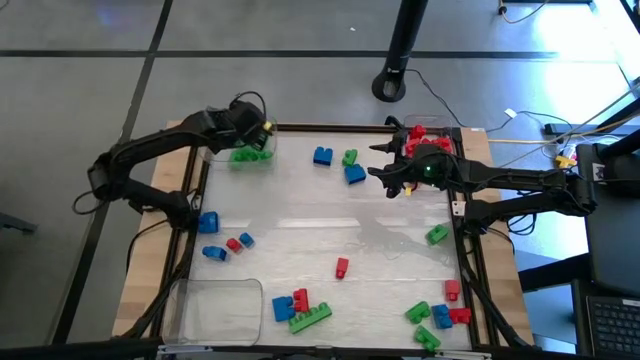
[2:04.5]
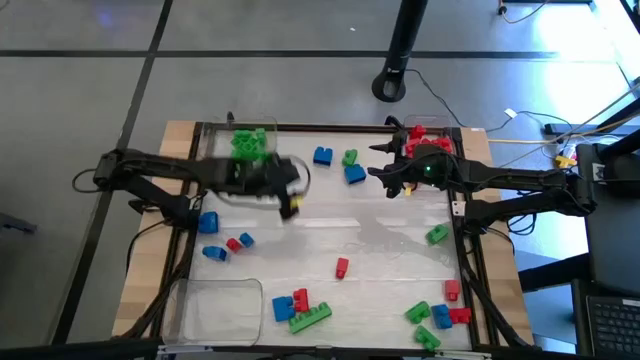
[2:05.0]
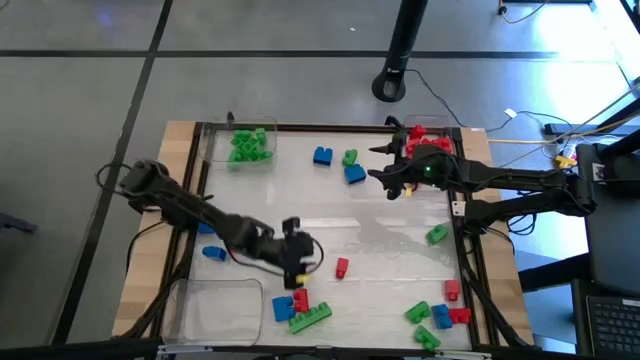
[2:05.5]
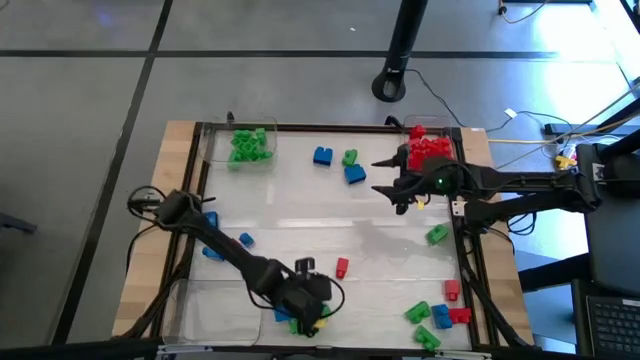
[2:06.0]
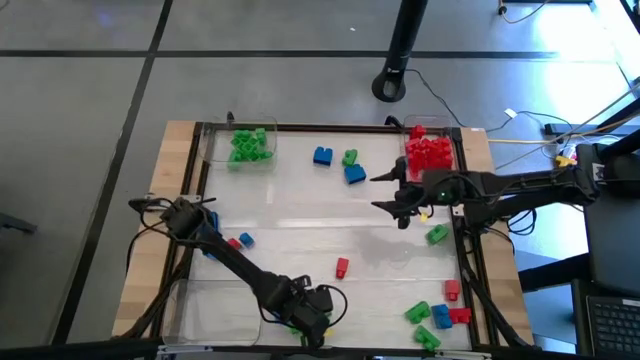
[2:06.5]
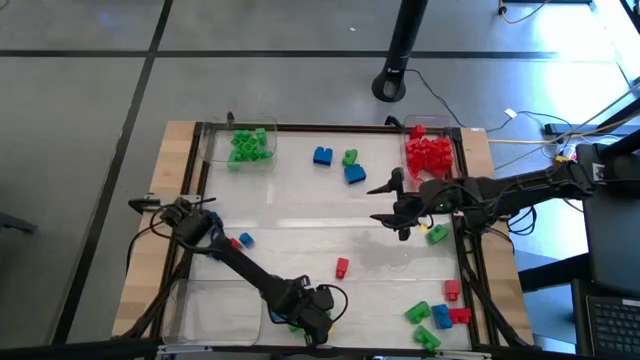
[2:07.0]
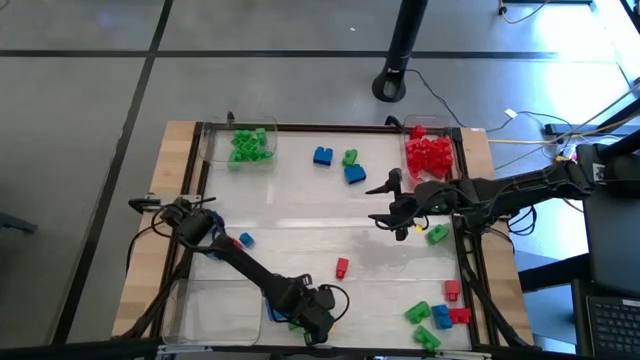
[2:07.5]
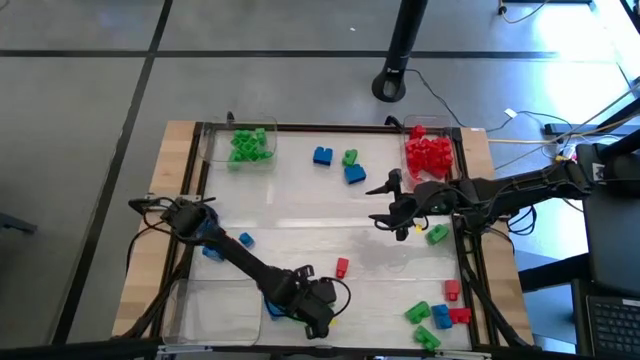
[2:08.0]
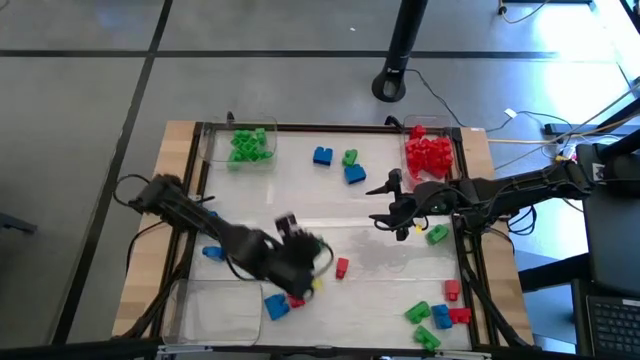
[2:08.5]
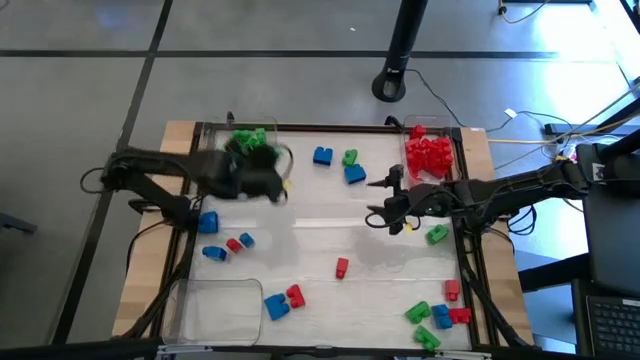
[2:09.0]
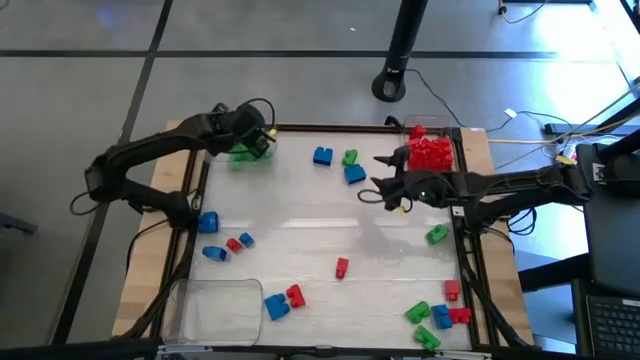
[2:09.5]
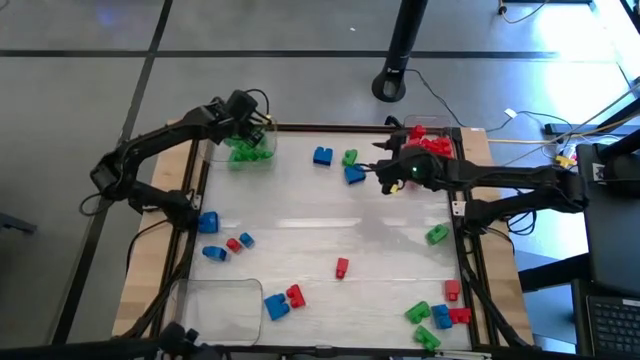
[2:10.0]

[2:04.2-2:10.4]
Task: Sort blocks
Put the green game piece into the left transparent bin

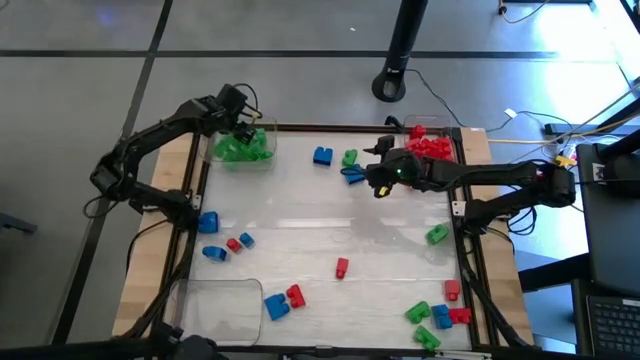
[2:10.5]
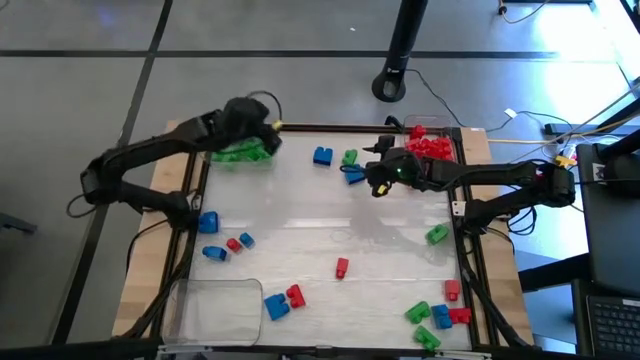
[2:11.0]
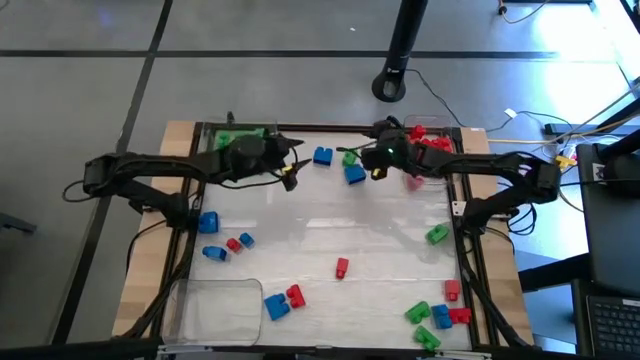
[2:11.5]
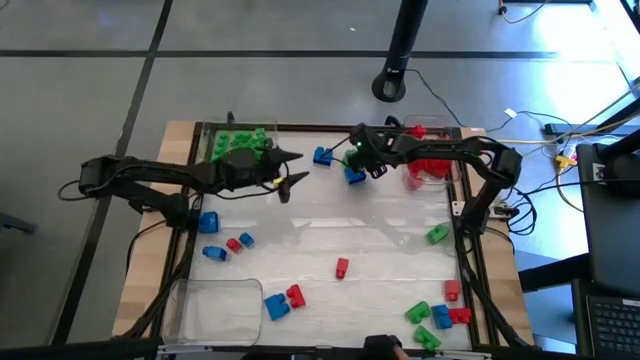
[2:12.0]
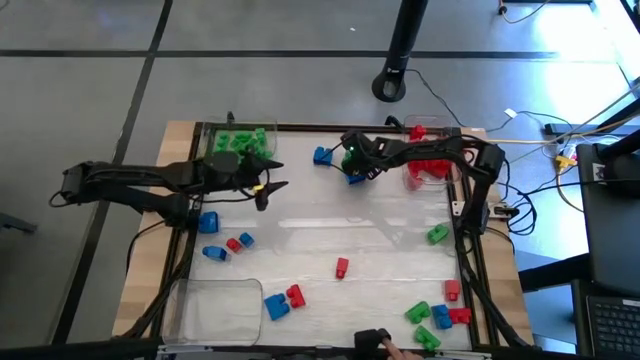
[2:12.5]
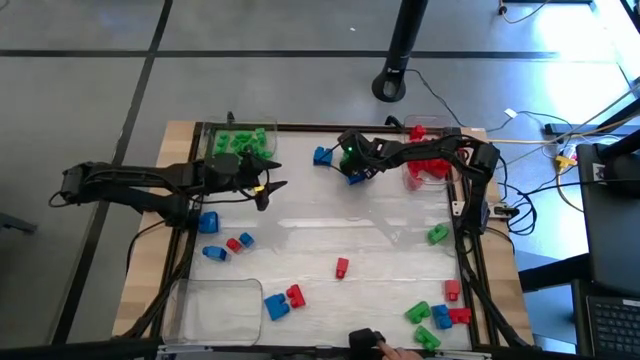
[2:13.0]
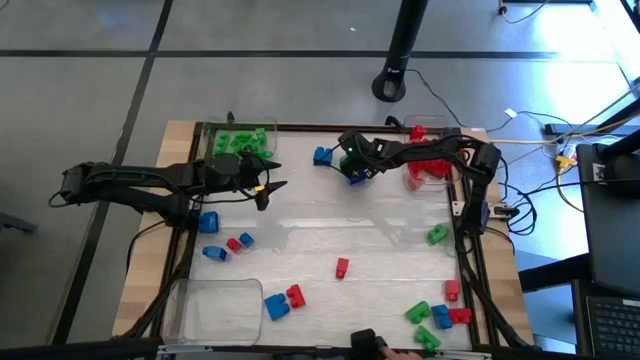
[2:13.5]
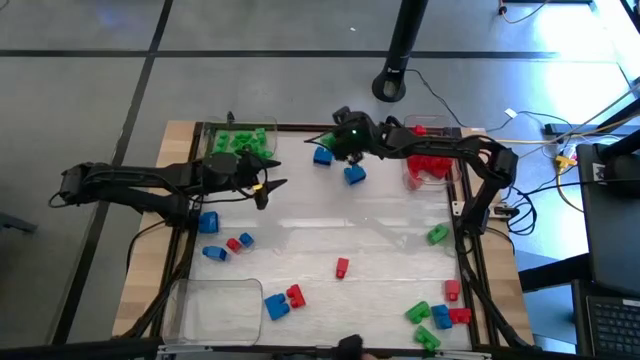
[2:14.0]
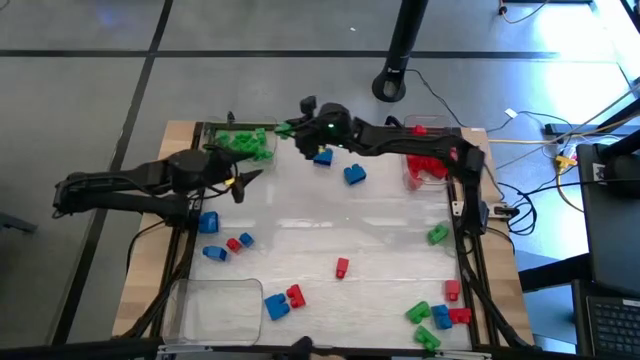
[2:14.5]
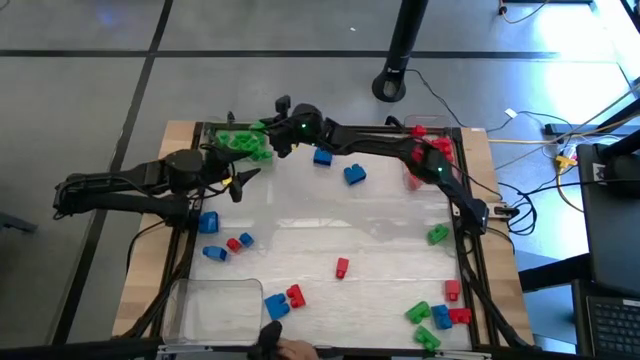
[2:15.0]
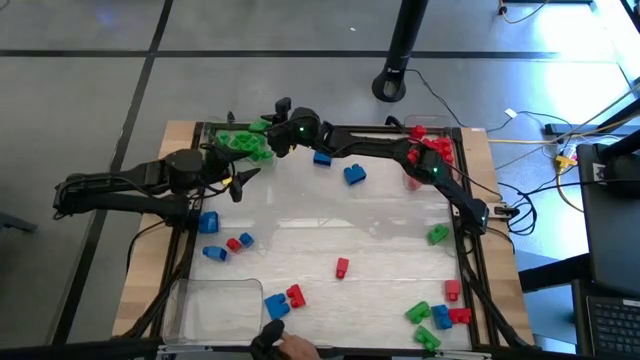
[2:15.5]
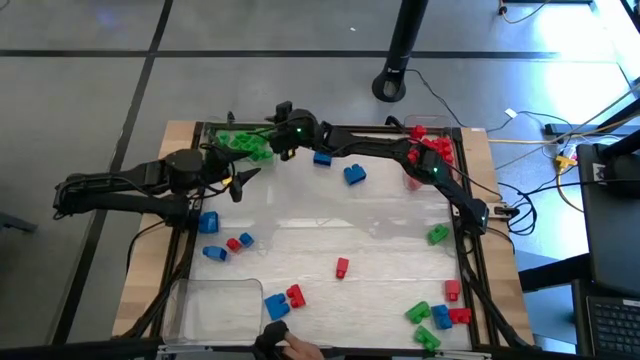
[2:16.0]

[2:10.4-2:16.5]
Put the green game piece into the left transparent bin

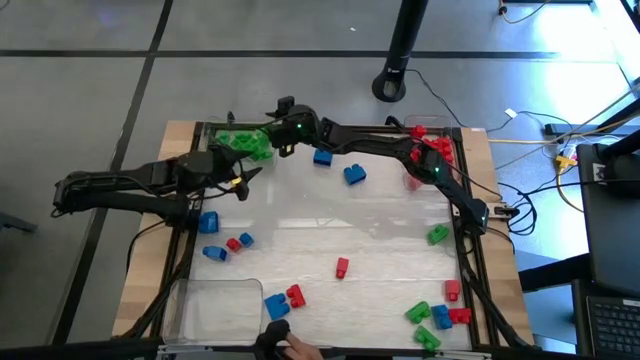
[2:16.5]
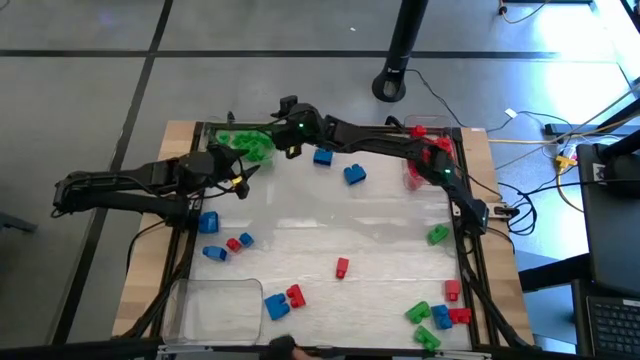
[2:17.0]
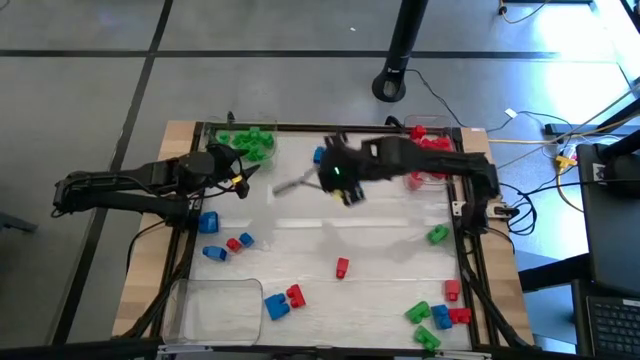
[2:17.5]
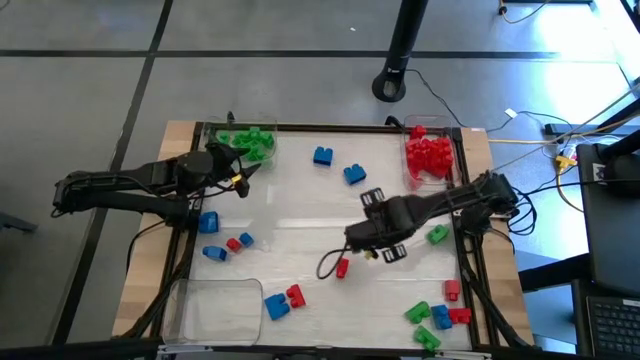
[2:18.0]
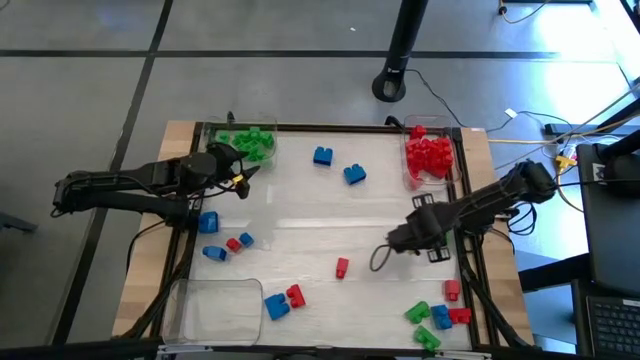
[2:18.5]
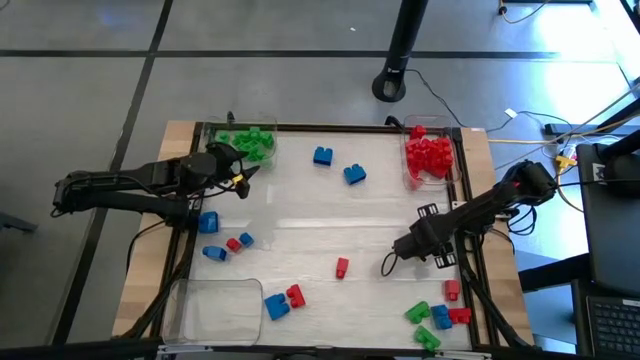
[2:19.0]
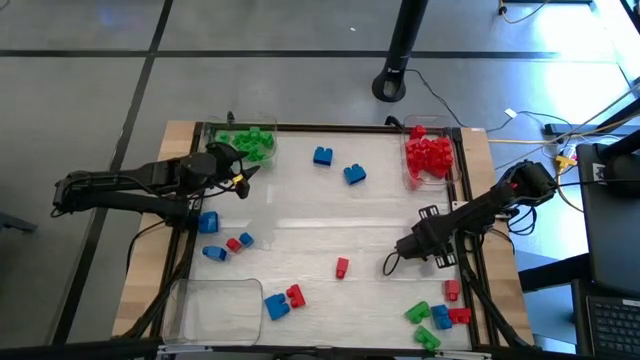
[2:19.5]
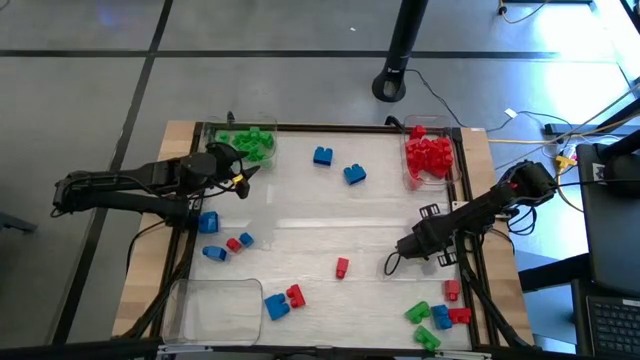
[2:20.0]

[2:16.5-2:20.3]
Put the green game piece into the left transparent bin

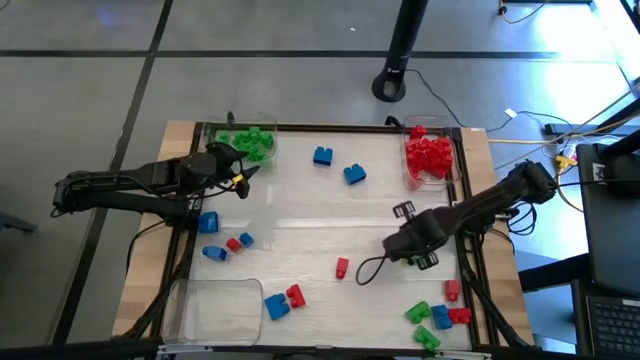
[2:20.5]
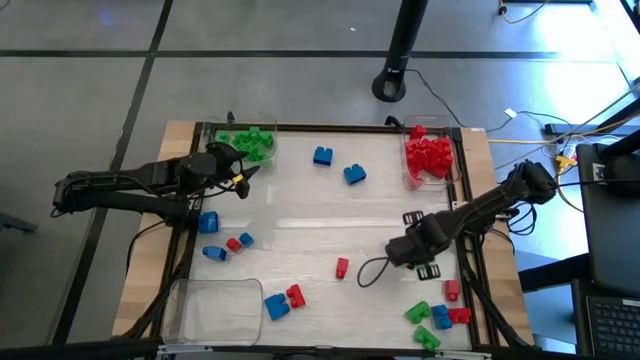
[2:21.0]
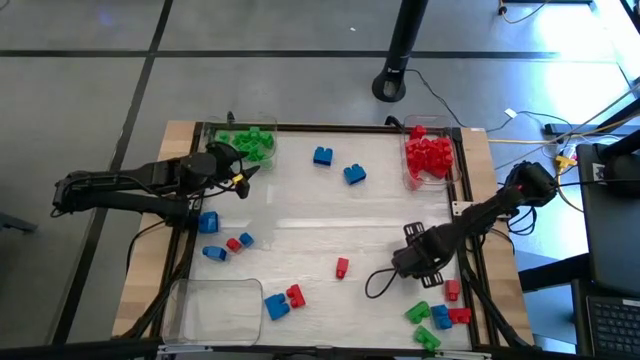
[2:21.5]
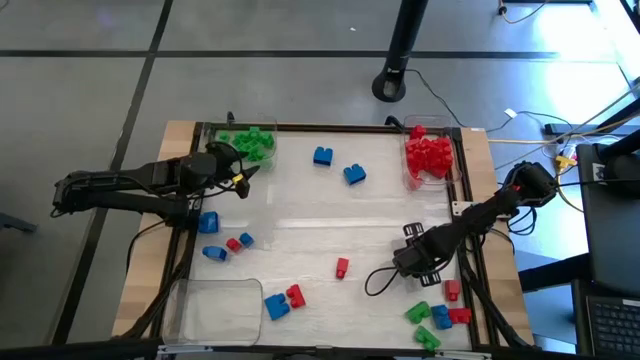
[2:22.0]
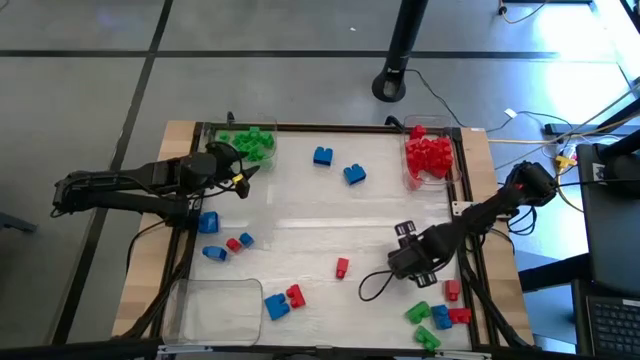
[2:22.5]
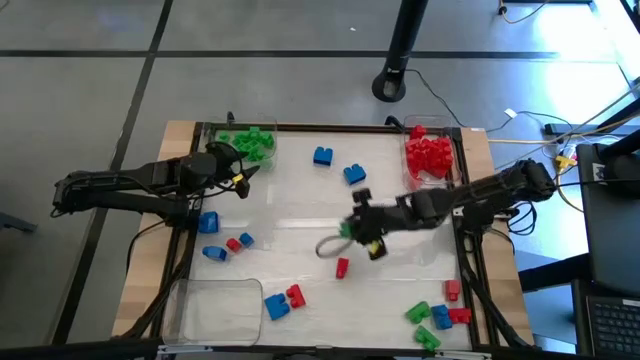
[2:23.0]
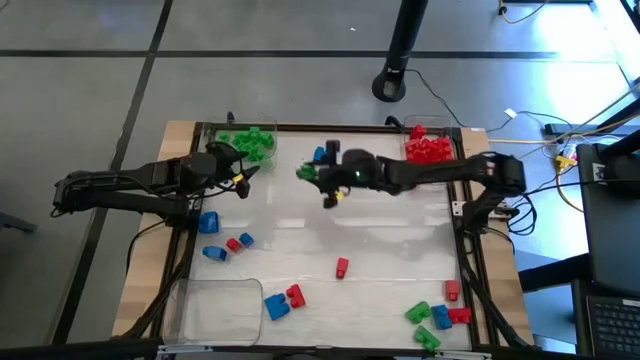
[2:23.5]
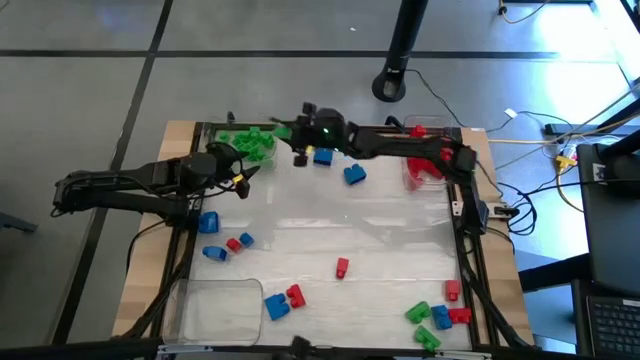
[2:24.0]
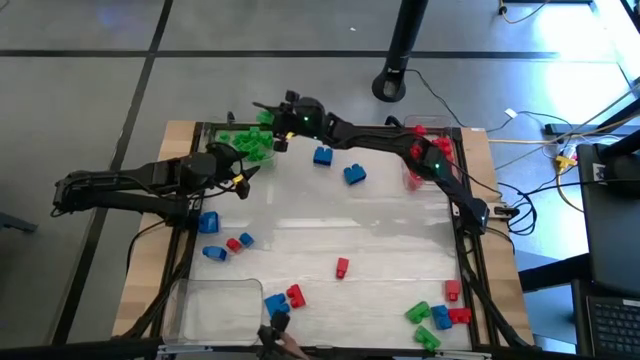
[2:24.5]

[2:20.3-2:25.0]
Put the green game piece into the left transparent bin
